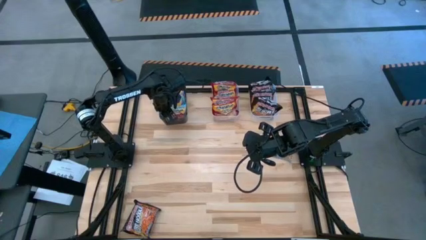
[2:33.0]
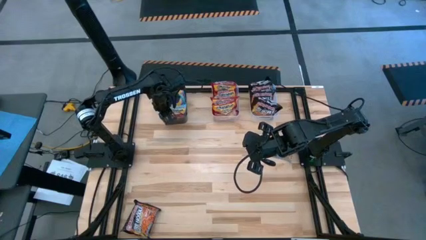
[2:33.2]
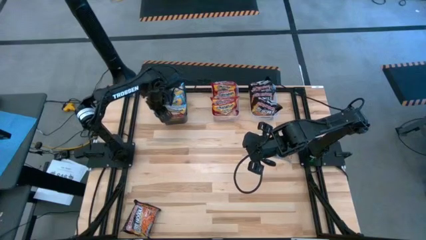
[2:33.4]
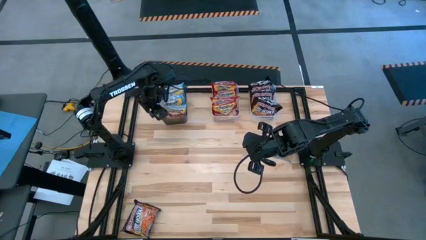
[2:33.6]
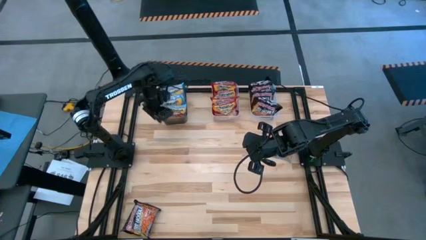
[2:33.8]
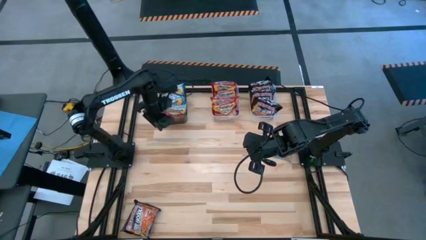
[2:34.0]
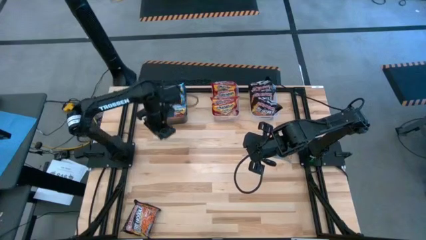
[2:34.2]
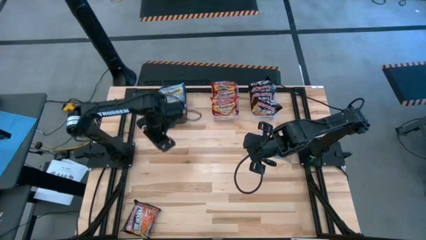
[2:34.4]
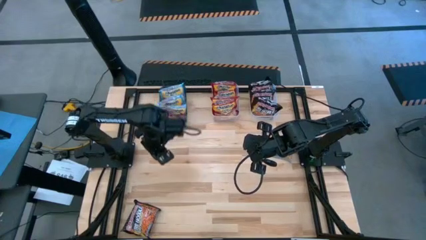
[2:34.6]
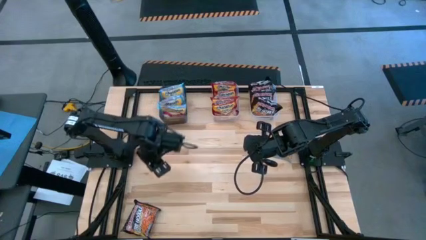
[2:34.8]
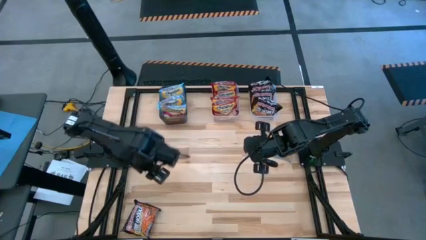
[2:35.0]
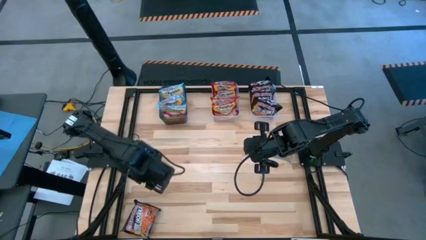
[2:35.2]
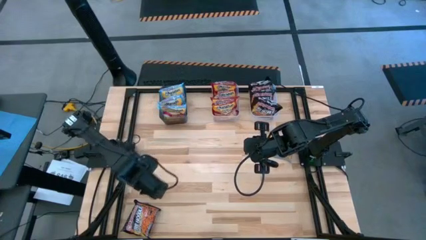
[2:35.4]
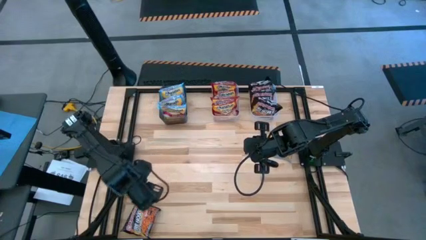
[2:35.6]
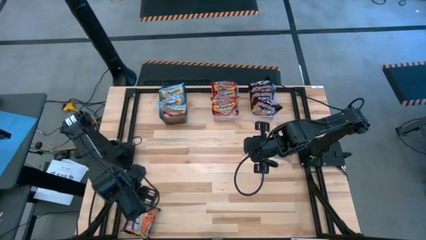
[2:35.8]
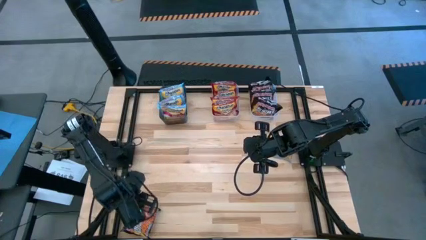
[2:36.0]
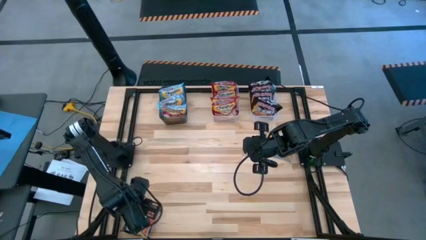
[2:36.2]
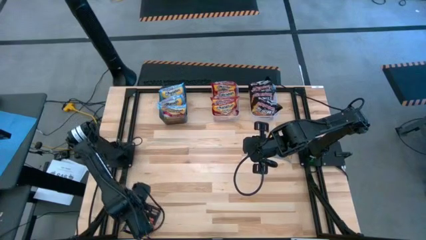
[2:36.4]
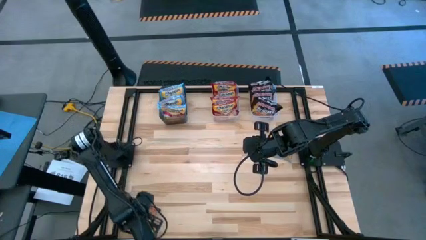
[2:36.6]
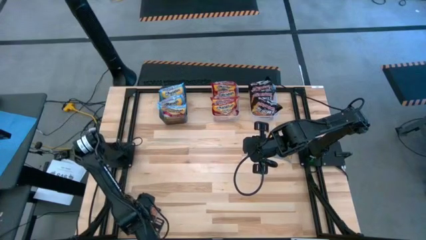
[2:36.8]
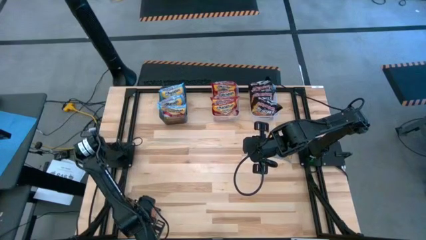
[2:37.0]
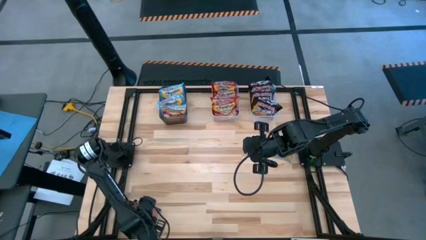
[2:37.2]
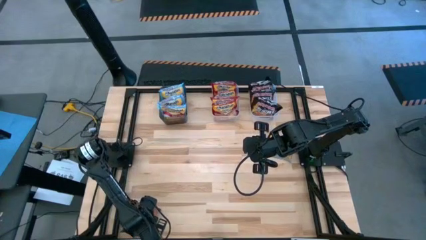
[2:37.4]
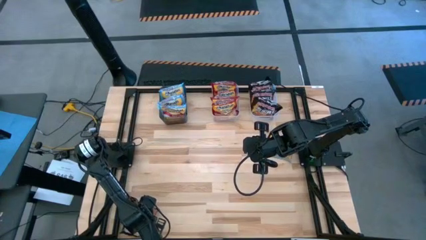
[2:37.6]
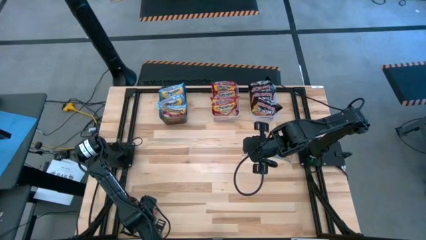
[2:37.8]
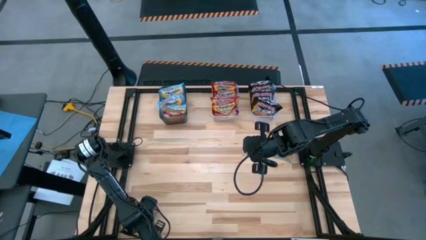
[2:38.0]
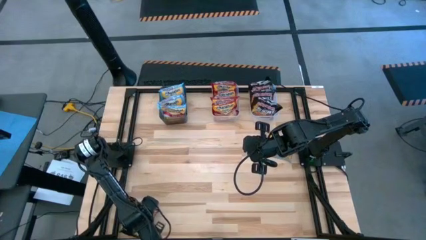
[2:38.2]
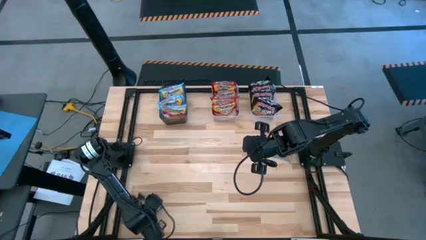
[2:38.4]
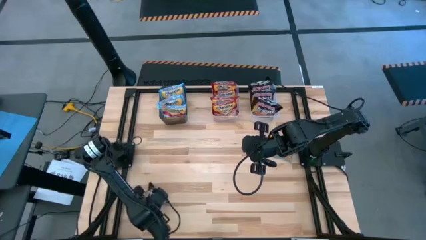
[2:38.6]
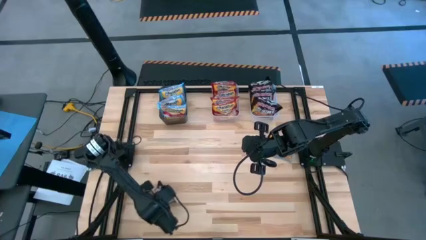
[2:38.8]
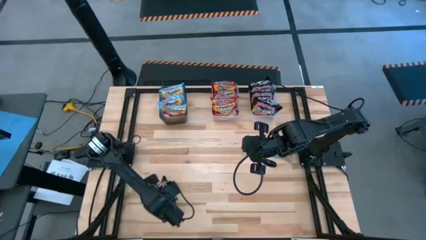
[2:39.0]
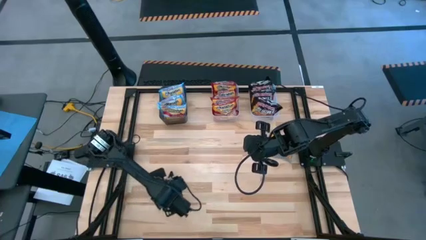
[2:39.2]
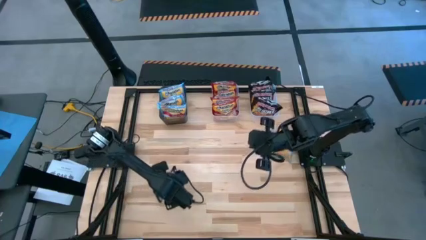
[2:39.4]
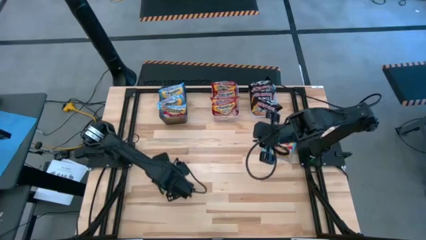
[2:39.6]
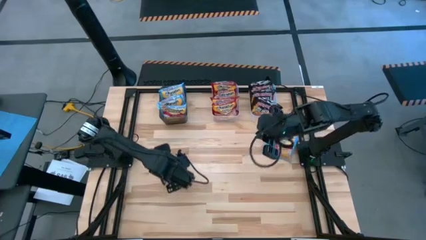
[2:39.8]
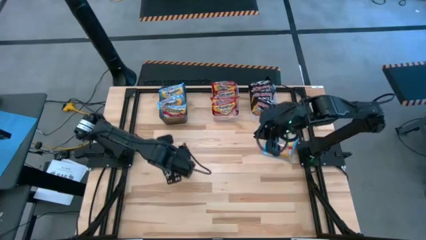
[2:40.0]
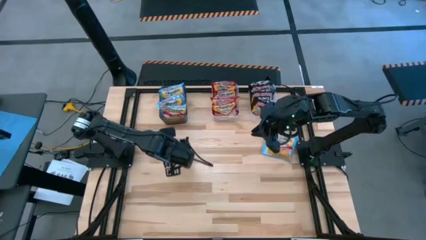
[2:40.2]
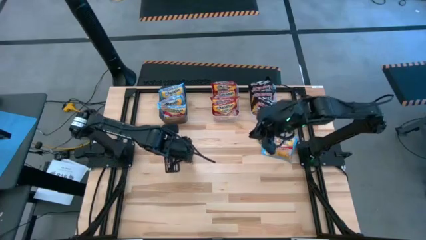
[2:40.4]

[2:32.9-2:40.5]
Task: Sort Maruchan noodles
Put the black noodle pack into the right transparent bin

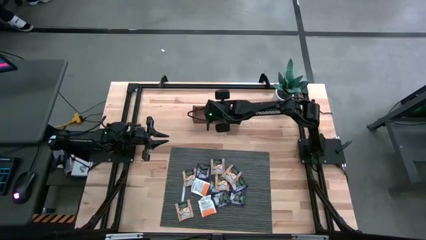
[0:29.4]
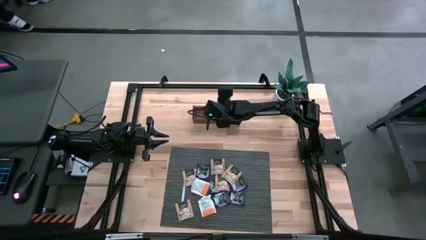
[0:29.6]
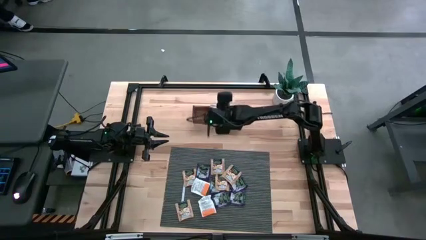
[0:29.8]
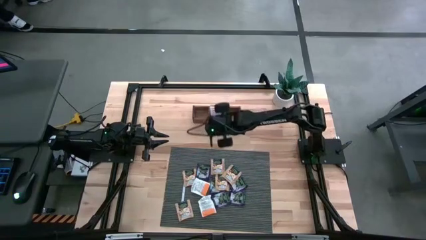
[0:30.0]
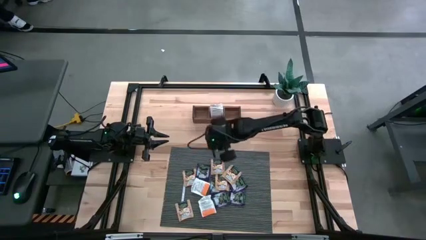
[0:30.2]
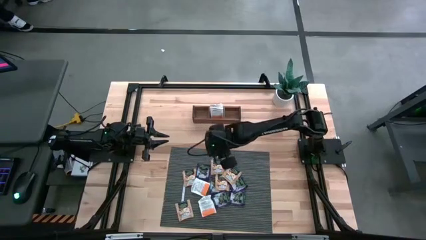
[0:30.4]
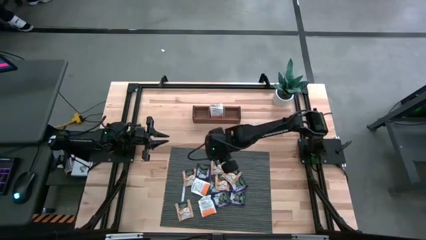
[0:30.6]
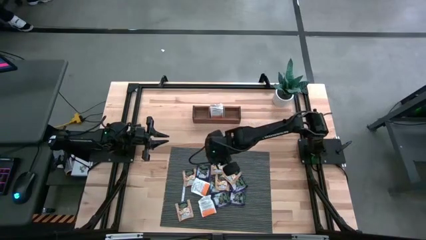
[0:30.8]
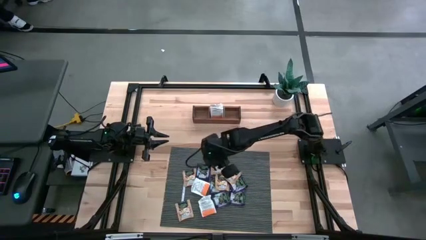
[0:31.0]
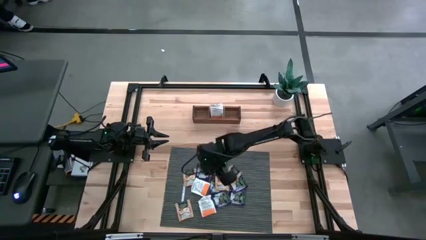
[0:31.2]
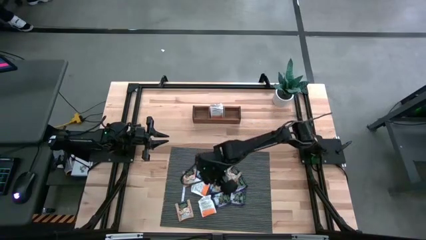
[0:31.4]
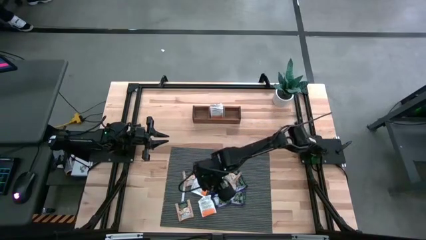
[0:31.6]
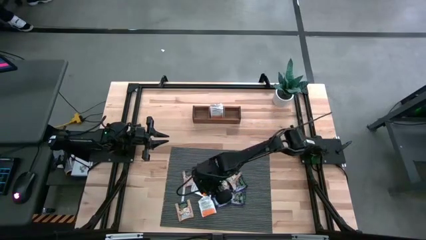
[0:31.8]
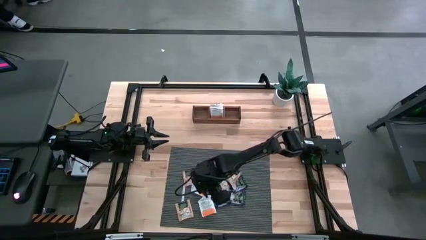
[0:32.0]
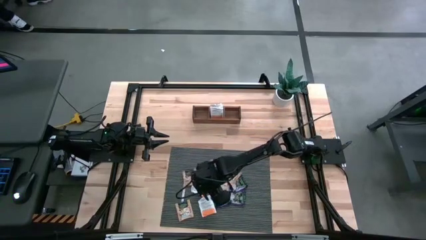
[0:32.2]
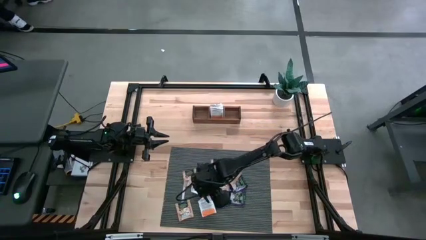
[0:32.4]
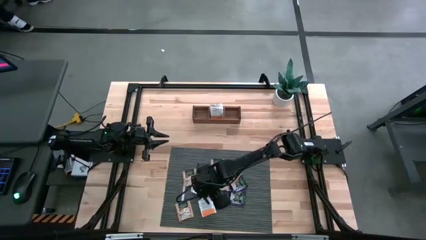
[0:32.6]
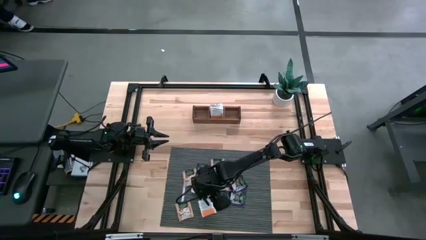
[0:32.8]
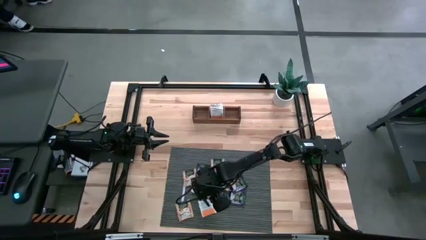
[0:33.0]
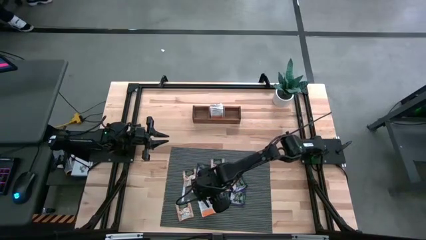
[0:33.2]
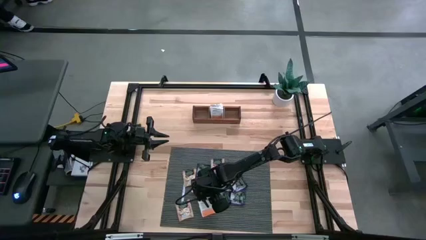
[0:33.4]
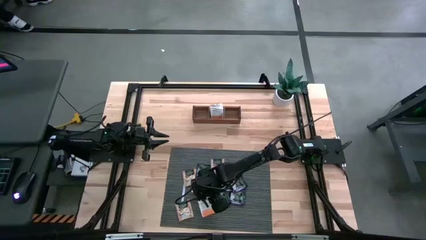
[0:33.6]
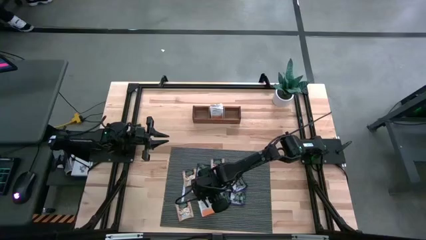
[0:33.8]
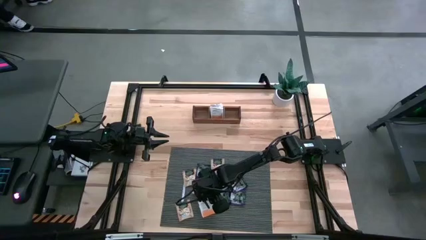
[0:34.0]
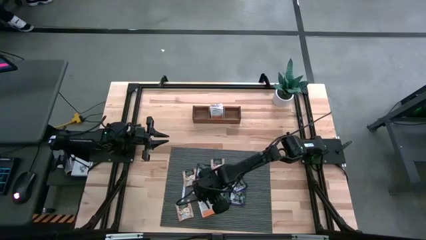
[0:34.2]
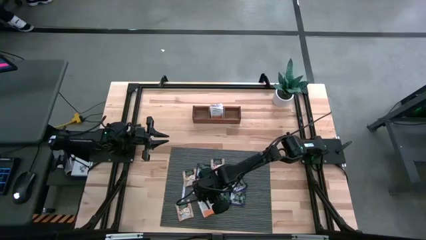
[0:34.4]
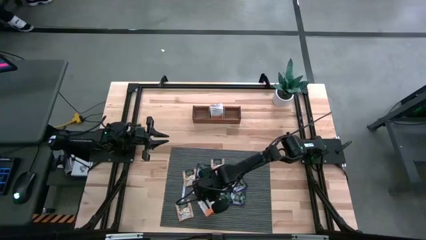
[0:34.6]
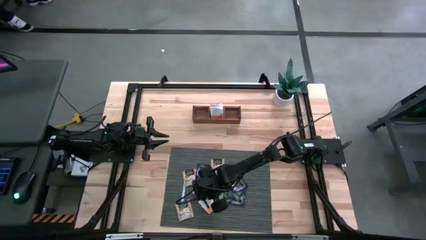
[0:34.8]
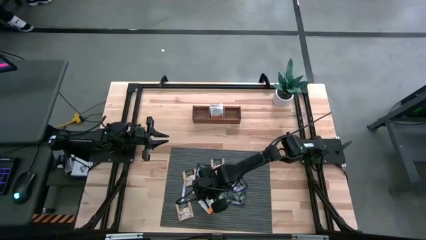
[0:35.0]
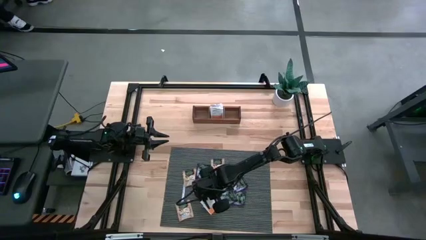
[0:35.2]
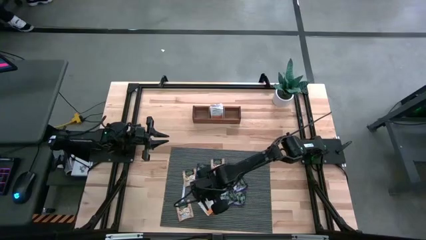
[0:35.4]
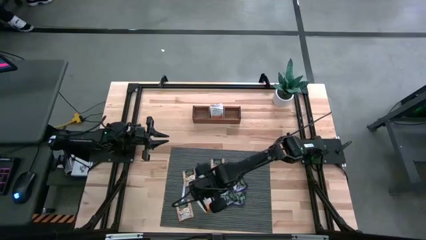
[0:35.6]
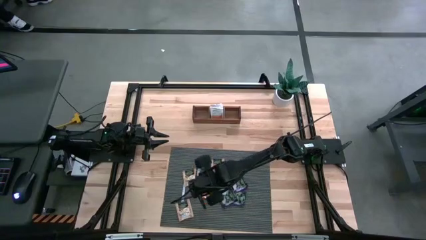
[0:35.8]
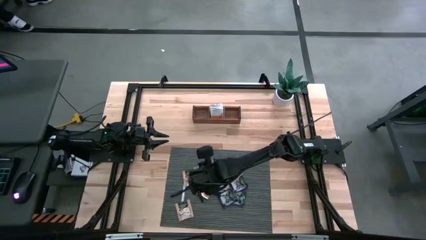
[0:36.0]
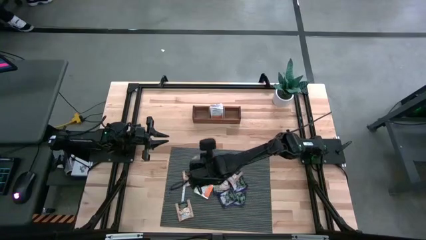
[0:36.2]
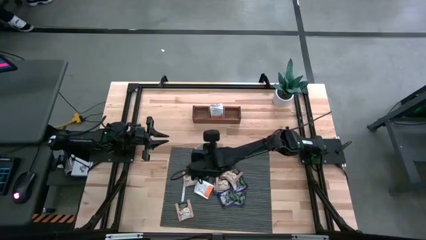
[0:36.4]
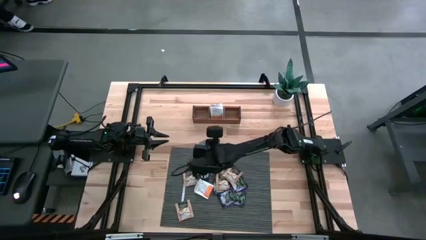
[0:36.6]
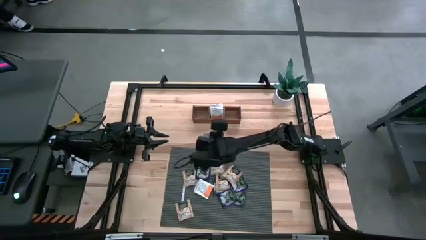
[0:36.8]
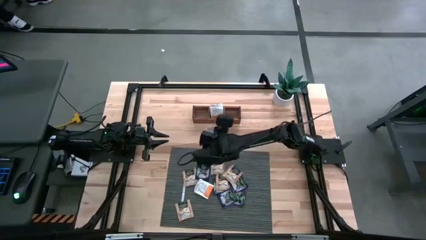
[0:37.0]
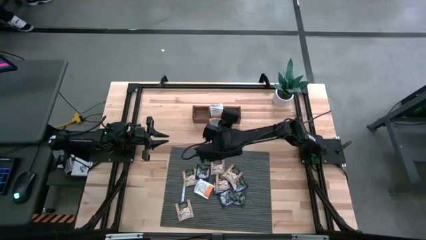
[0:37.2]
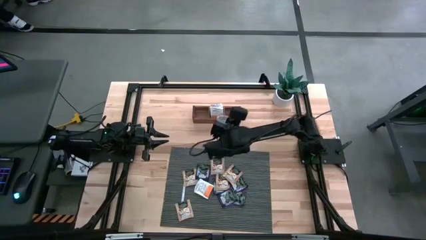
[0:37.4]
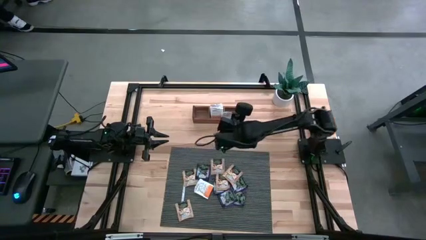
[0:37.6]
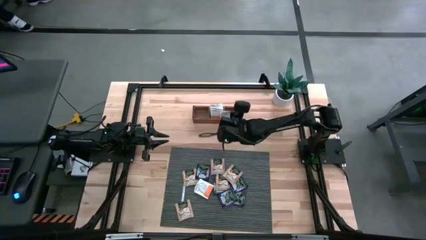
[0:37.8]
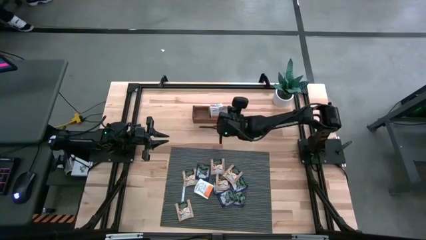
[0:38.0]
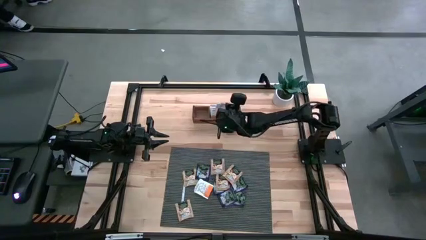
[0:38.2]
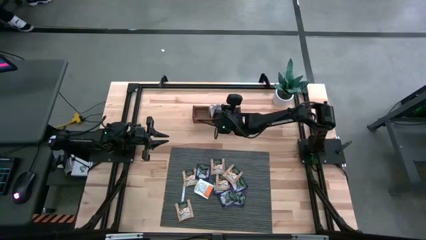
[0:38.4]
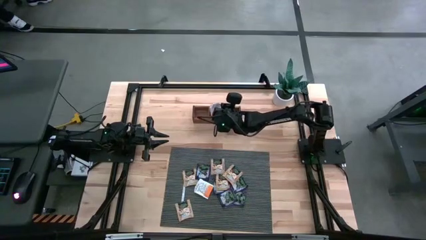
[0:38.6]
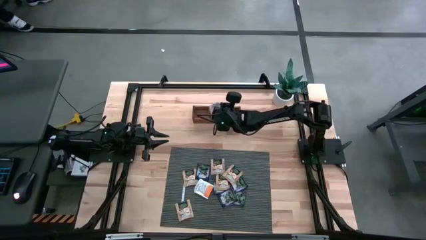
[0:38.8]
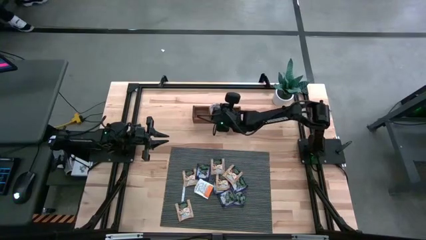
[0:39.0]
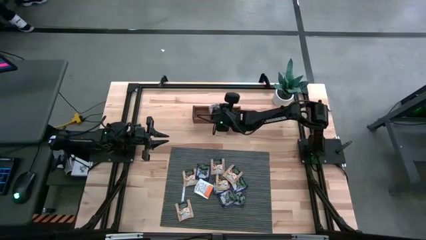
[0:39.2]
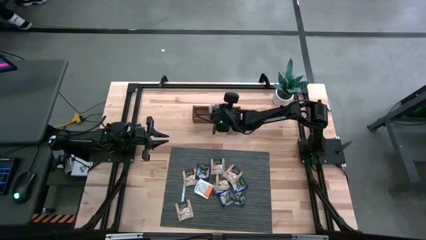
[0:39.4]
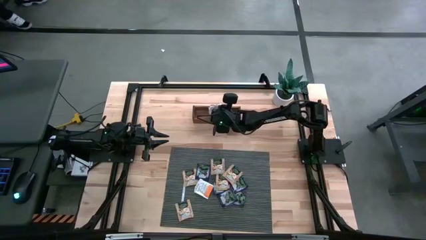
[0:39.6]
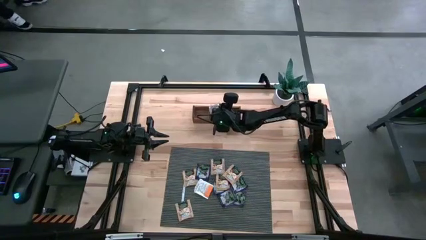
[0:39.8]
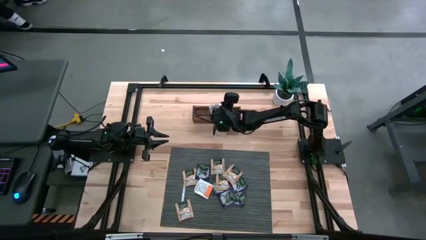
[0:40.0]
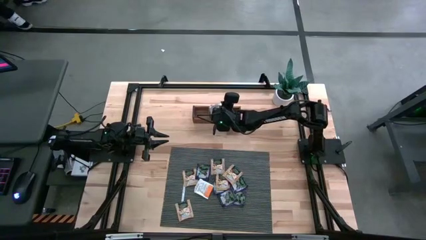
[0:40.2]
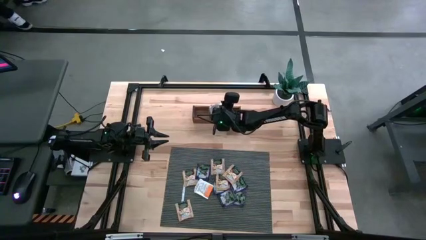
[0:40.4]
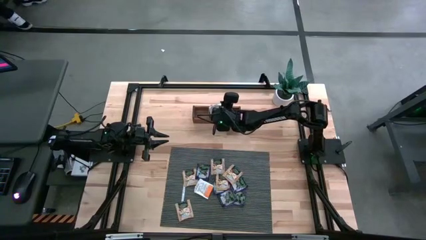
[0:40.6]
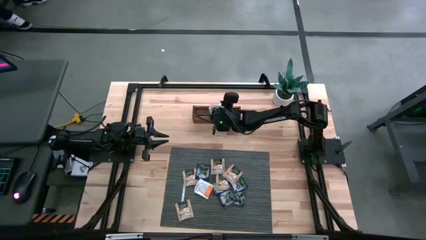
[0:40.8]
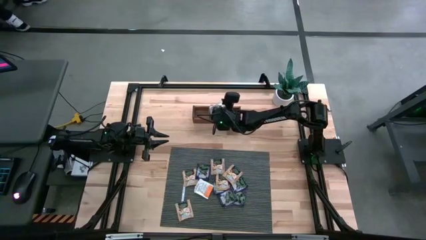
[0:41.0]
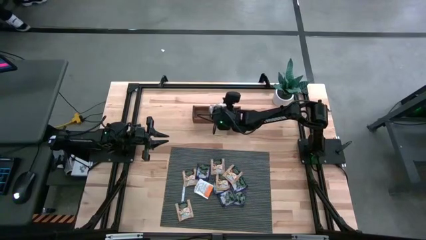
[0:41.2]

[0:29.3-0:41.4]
Task: Pick & Place Tea
Put the orange tea bag into the middle compartment of the wooden organizer
